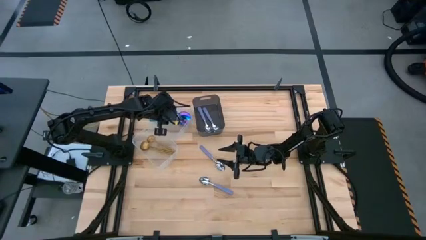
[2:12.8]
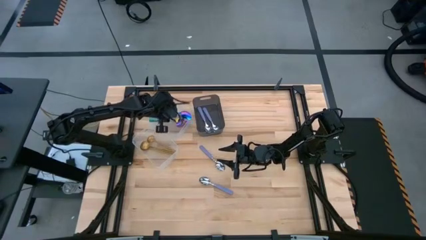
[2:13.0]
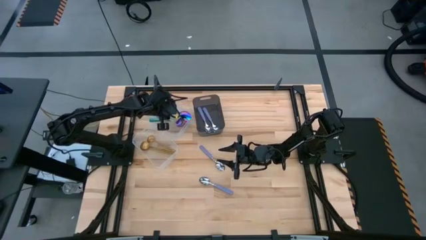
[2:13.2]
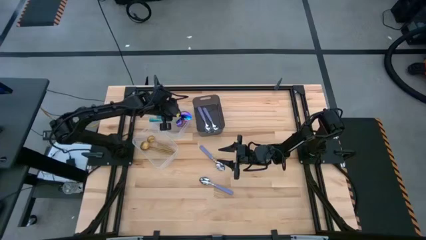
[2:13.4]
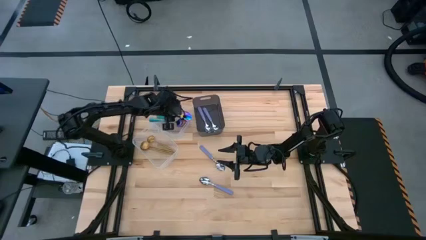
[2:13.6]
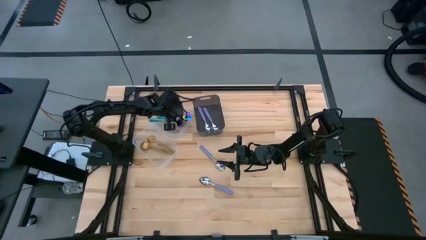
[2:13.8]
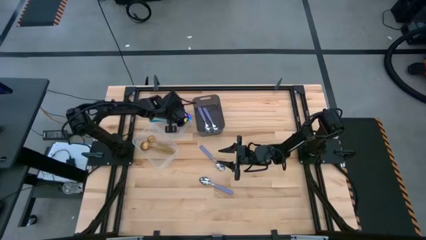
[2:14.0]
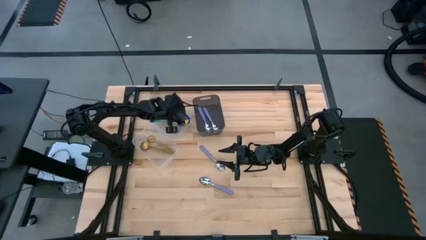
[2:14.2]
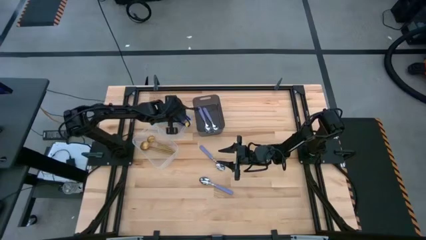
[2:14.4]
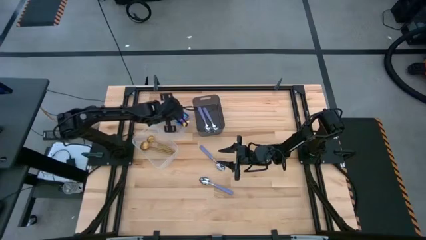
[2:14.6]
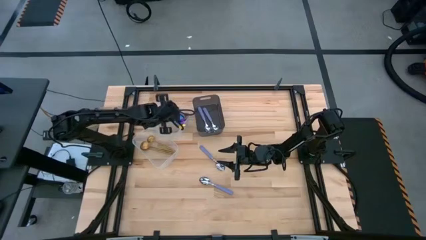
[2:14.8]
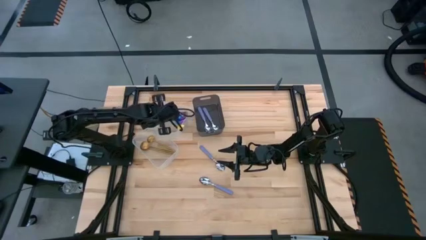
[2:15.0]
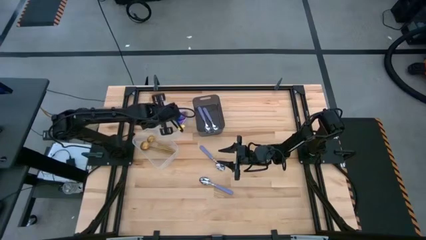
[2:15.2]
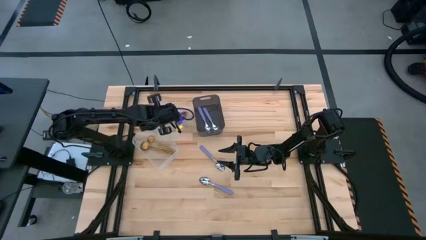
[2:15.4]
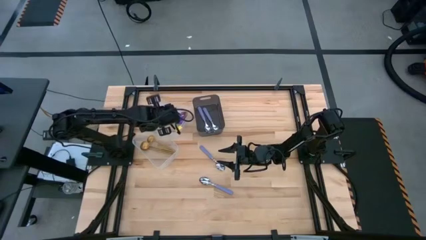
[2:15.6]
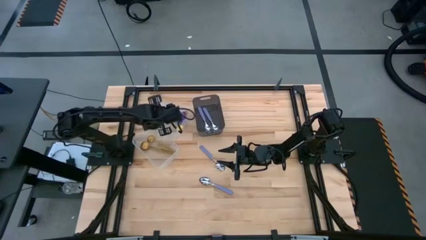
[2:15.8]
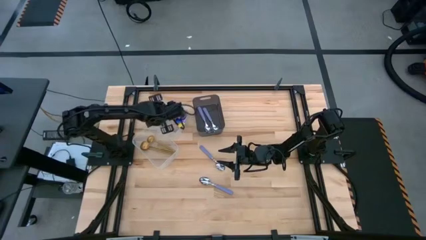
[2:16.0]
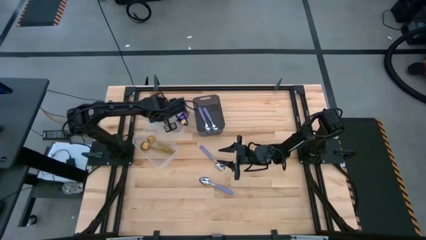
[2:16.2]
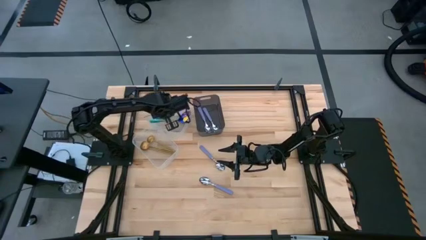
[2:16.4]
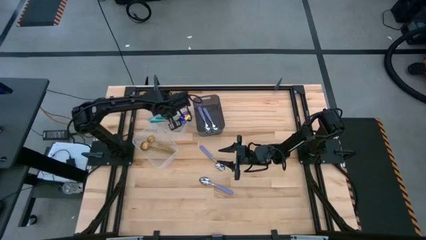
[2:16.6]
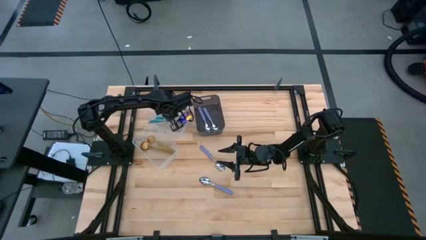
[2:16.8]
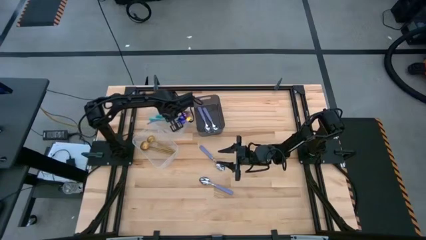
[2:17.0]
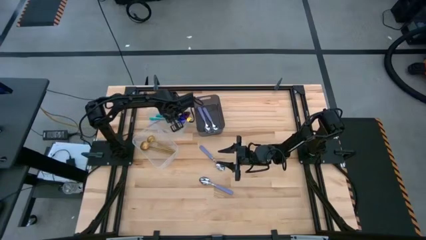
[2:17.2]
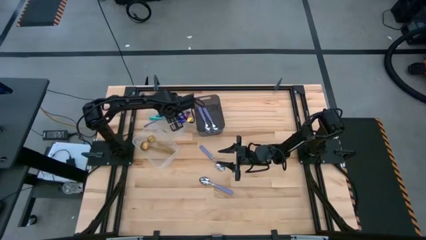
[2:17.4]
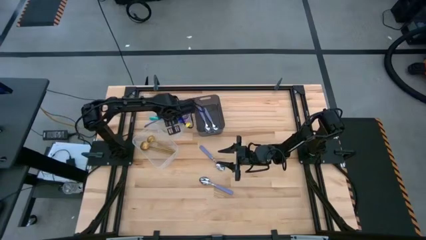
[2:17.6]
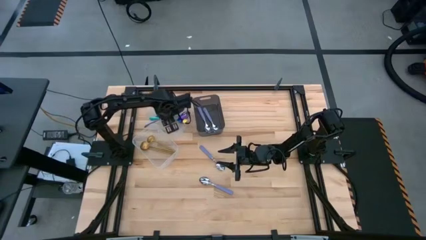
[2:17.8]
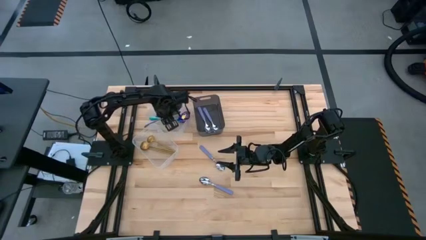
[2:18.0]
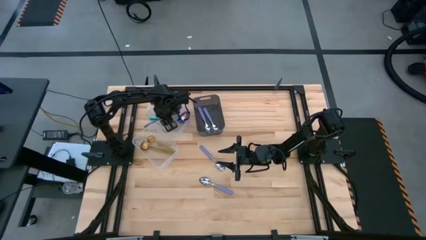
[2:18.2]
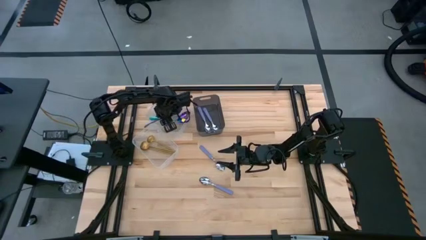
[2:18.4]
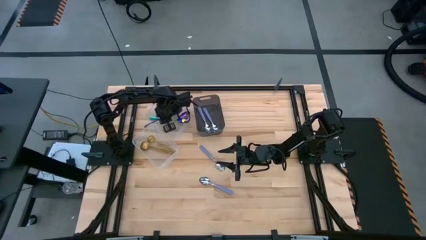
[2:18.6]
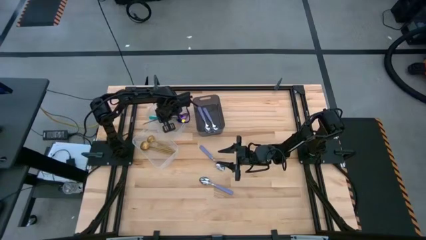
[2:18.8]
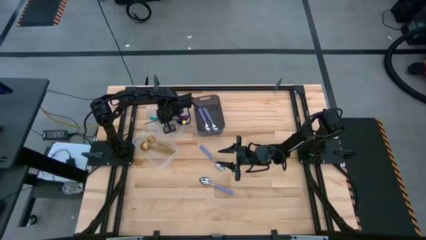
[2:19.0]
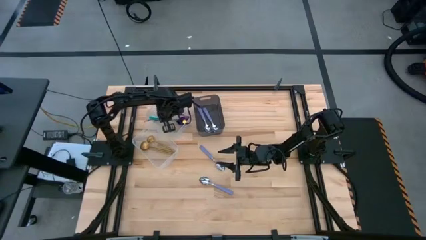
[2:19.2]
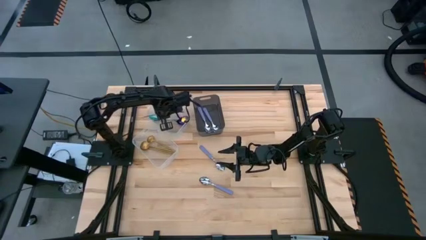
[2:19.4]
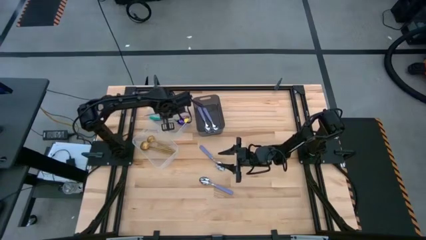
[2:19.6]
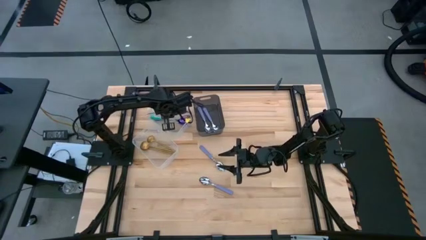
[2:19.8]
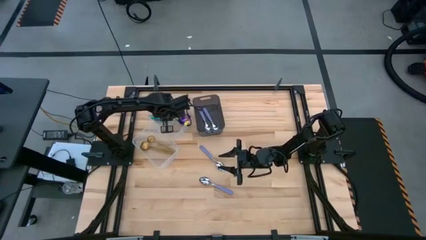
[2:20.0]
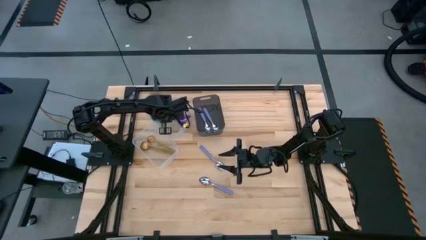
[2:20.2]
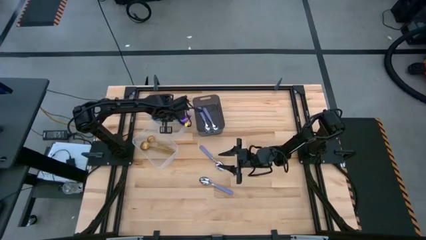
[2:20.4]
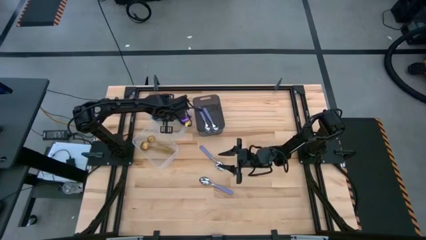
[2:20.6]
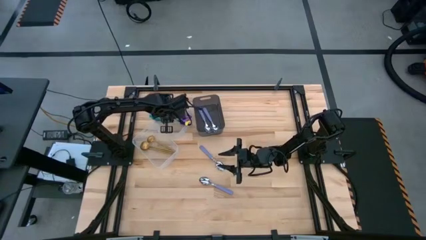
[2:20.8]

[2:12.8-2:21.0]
Task: Sort silverware by color (type)
Adjust the blue spoon

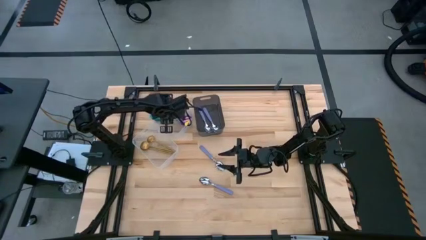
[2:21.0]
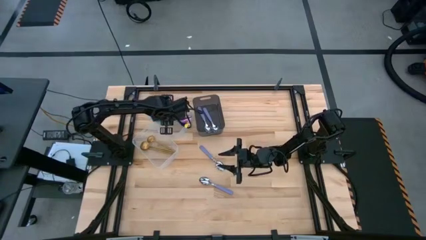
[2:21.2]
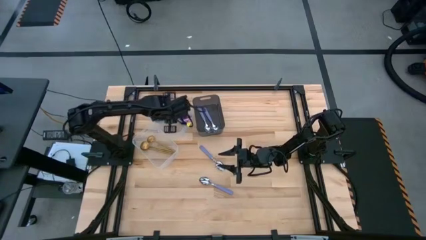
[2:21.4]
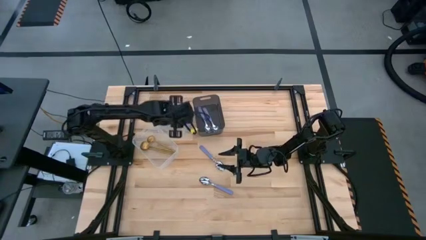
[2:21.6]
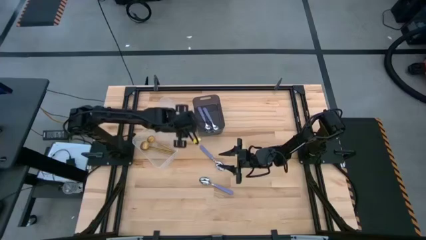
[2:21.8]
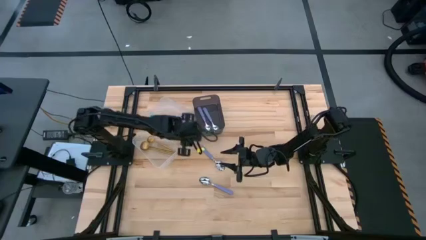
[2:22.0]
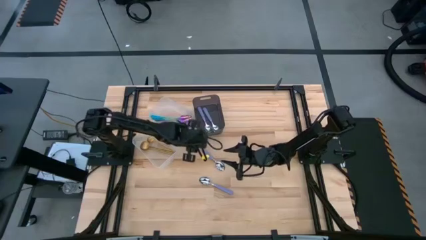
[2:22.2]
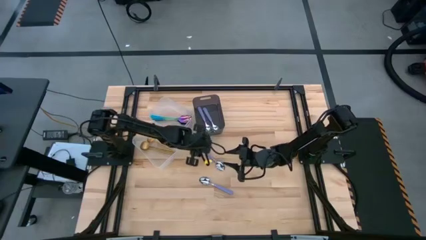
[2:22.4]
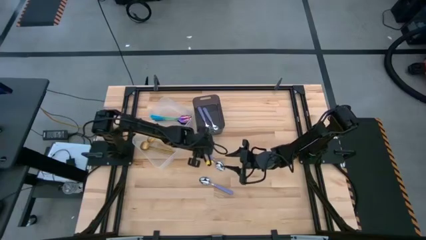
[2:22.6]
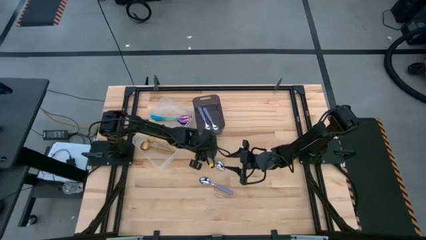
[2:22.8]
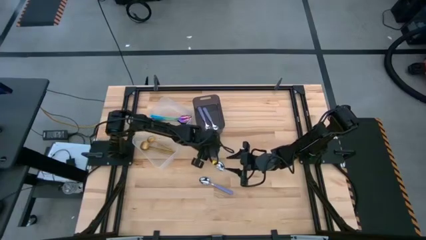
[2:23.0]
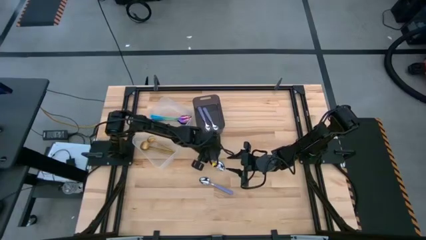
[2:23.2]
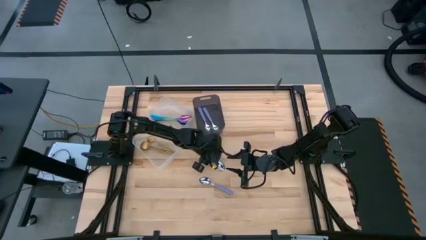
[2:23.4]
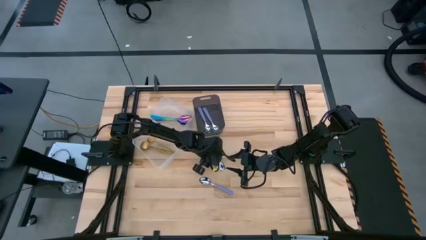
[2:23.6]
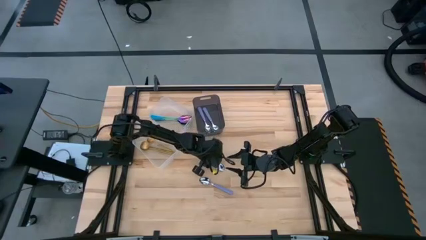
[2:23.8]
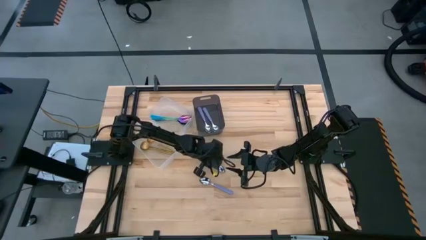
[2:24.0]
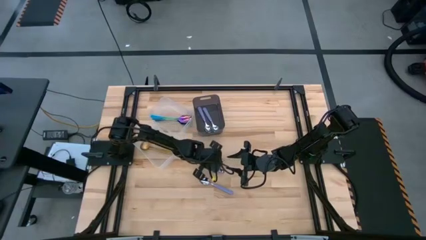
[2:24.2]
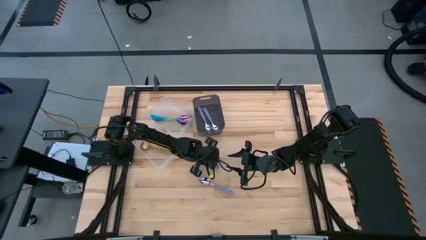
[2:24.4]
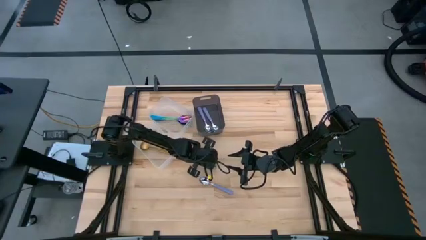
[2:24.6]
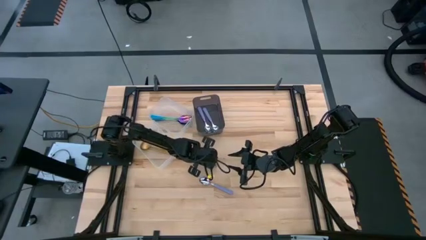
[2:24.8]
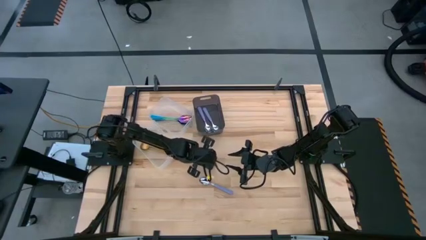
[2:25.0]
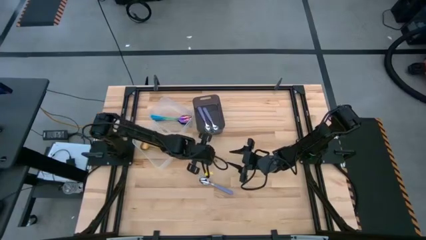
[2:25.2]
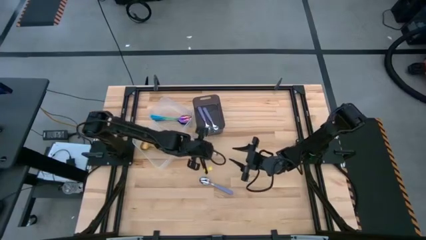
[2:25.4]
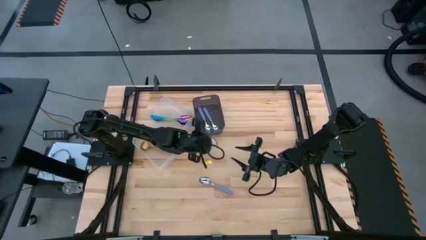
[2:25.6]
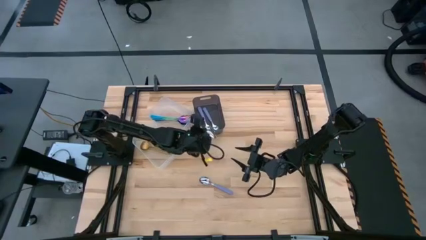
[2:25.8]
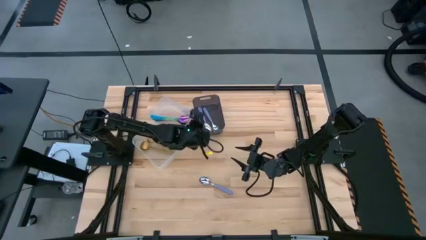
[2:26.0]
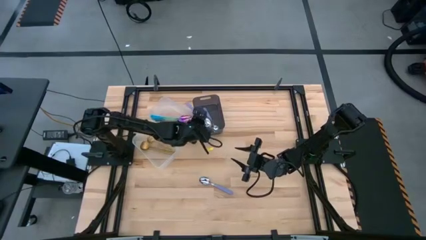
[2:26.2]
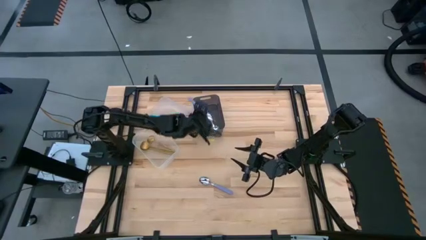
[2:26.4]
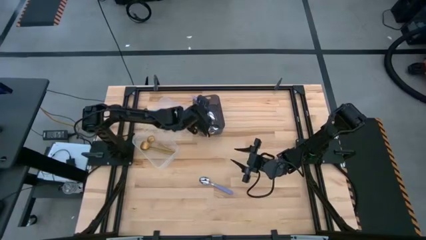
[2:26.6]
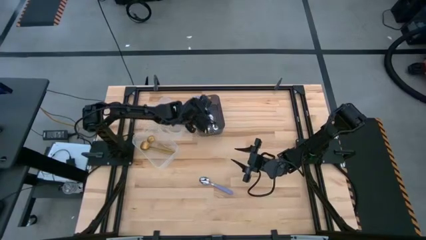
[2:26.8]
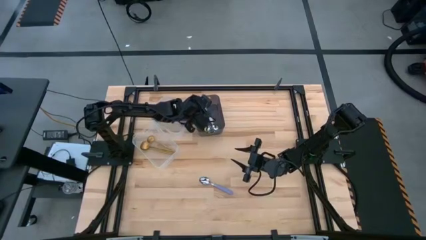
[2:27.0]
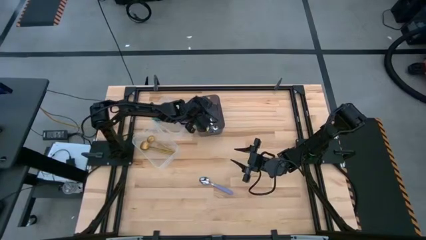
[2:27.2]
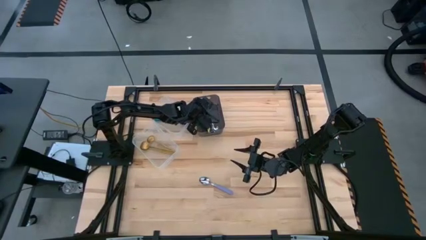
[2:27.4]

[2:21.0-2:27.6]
Put the purple spoon into the black transparent bin

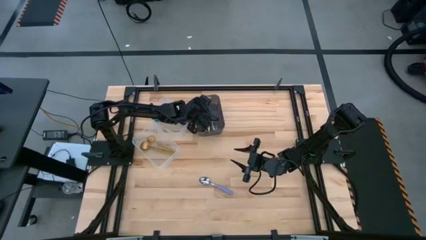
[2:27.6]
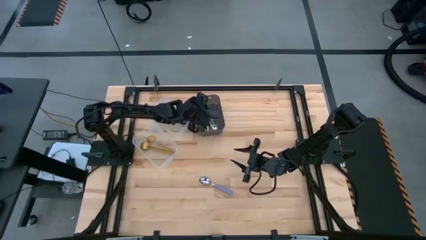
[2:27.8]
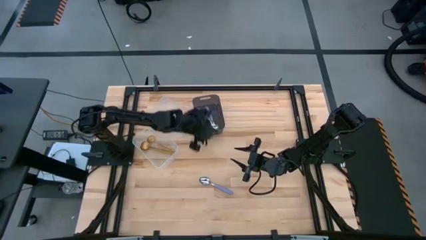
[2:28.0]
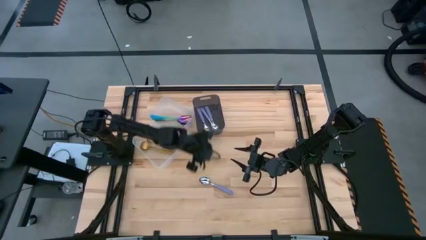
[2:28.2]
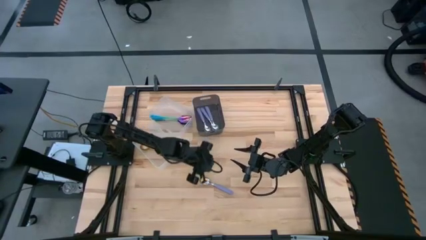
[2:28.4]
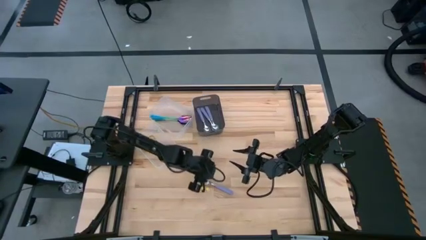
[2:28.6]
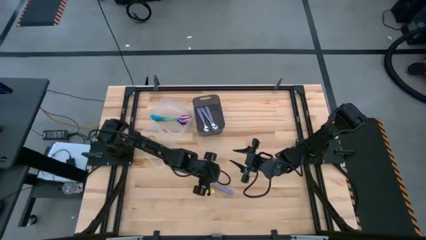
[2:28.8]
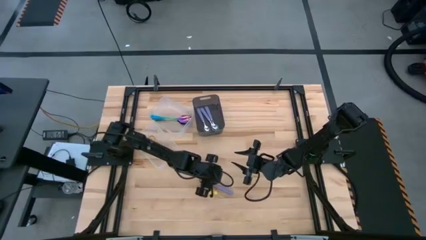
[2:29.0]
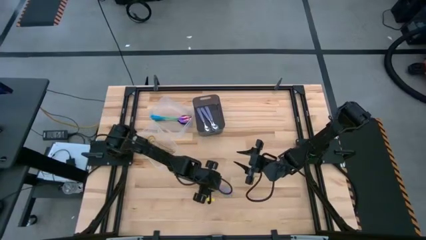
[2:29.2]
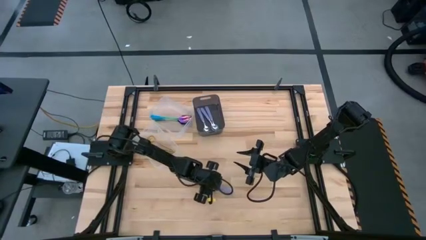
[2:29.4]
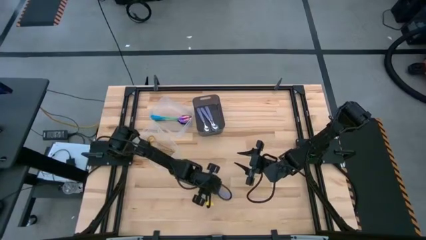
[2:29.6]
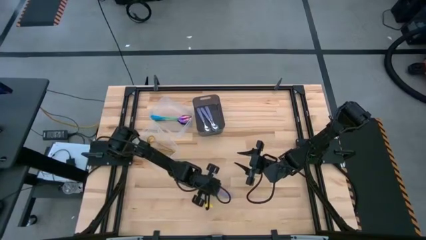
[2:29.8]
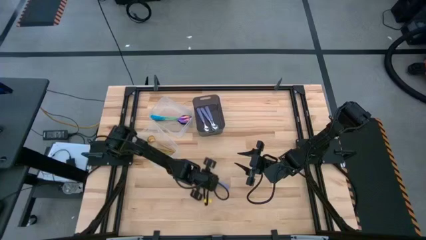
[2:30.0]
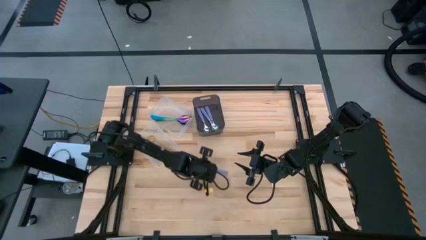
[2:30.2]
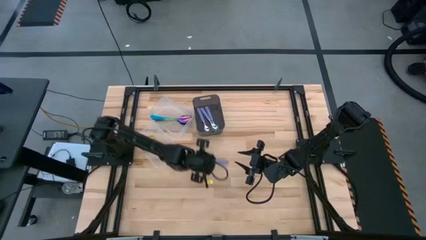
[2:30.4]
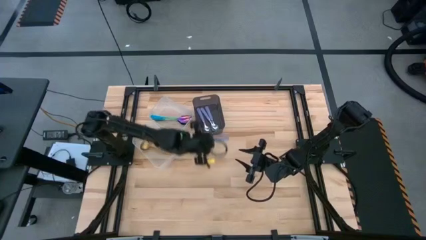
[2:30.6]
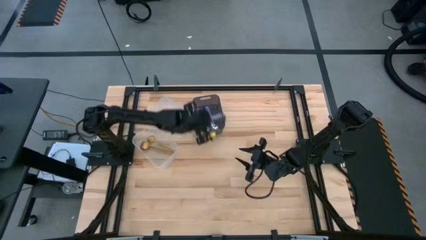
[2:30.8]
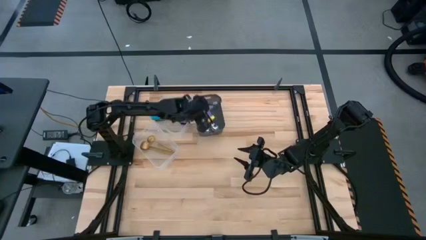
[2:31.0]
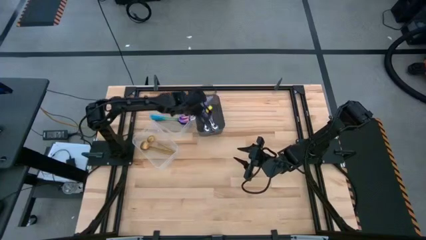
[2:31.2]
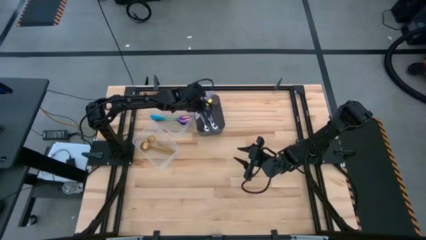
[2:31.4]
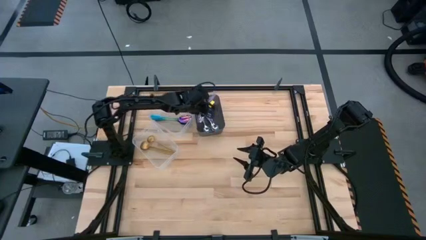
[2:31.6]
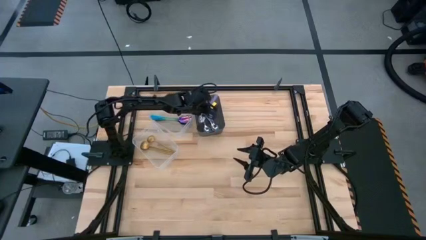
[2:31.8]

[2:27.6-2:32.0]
Put the purple spoon into the black transparent bin
